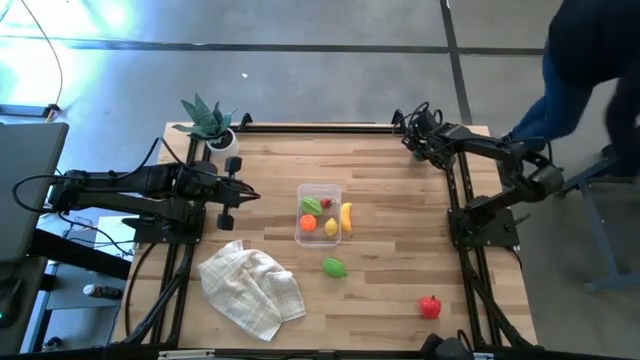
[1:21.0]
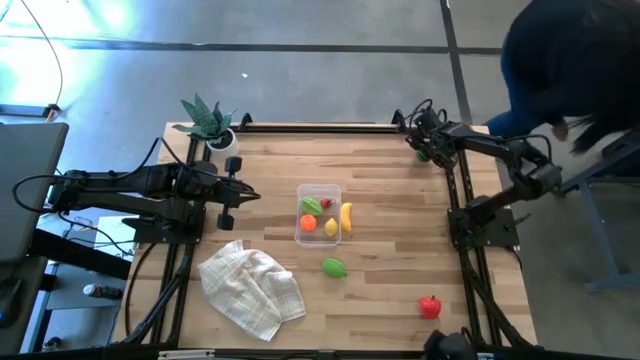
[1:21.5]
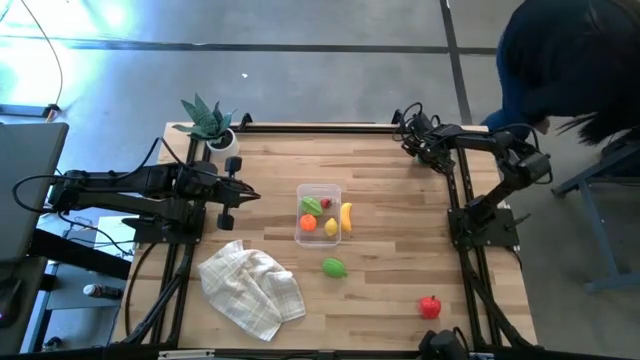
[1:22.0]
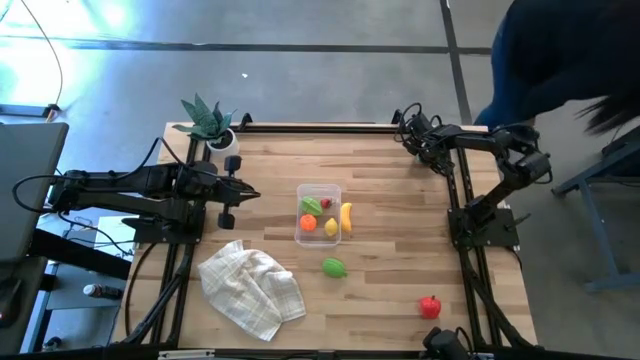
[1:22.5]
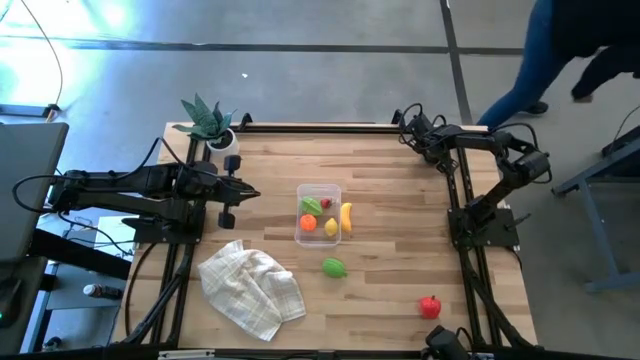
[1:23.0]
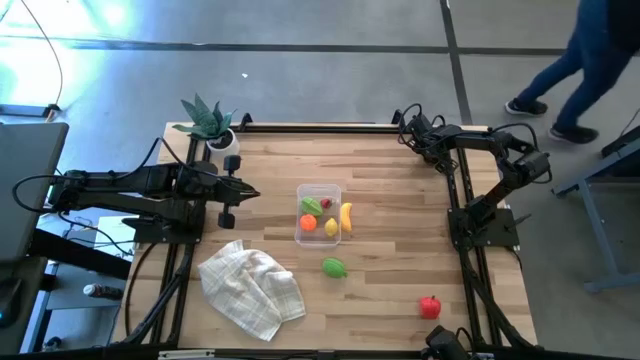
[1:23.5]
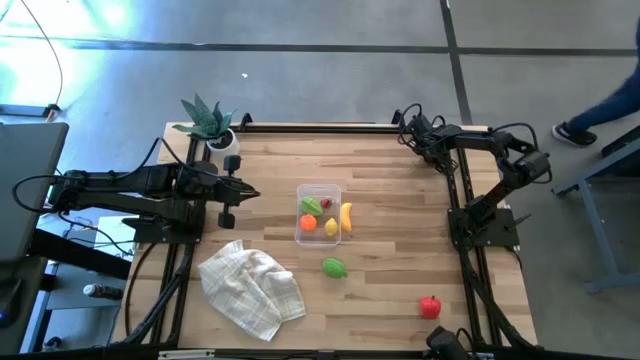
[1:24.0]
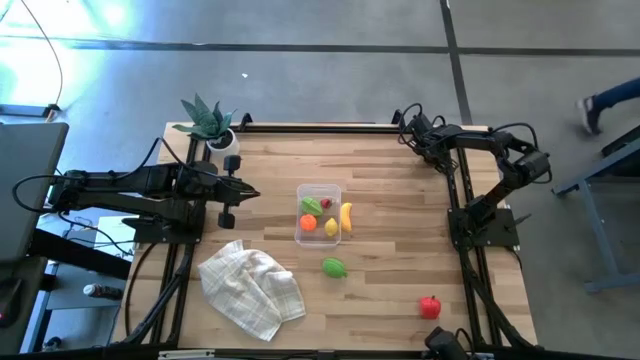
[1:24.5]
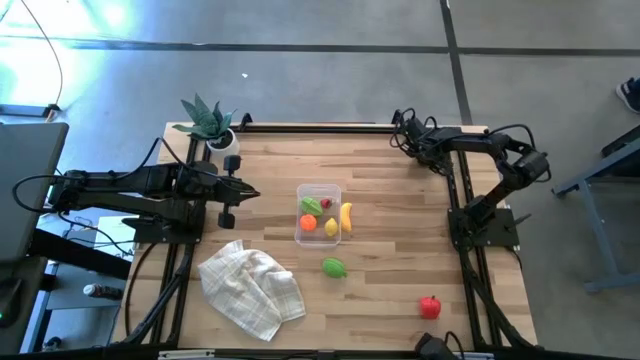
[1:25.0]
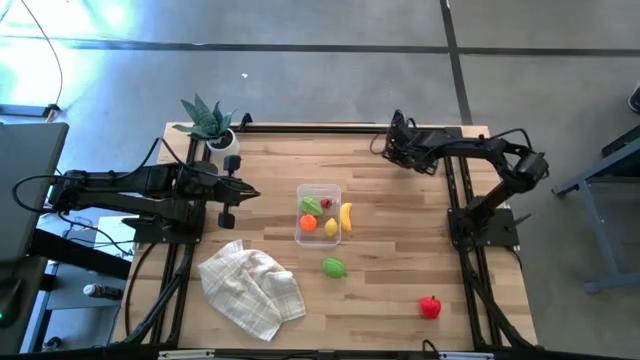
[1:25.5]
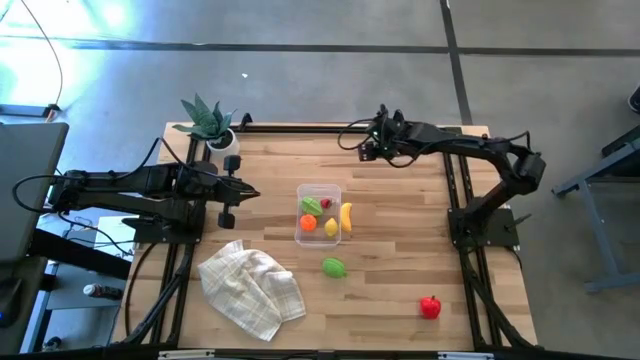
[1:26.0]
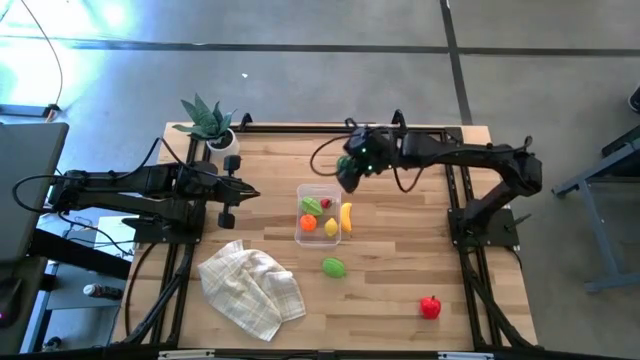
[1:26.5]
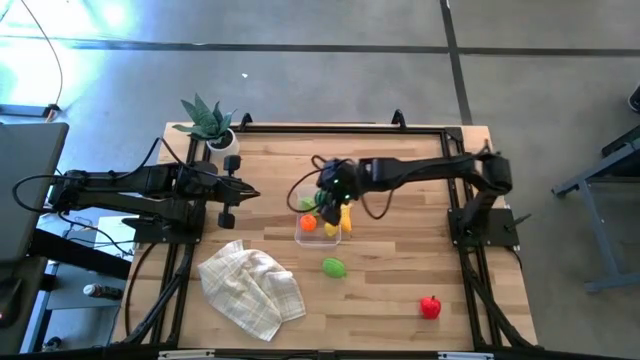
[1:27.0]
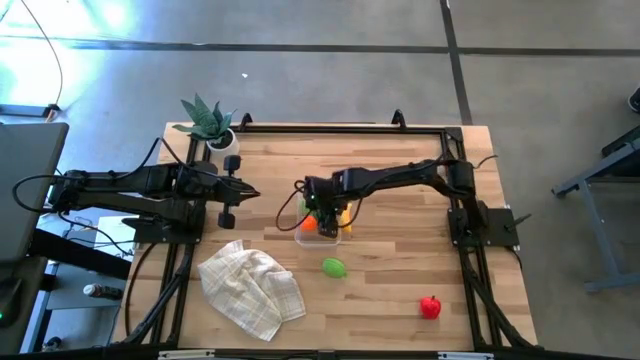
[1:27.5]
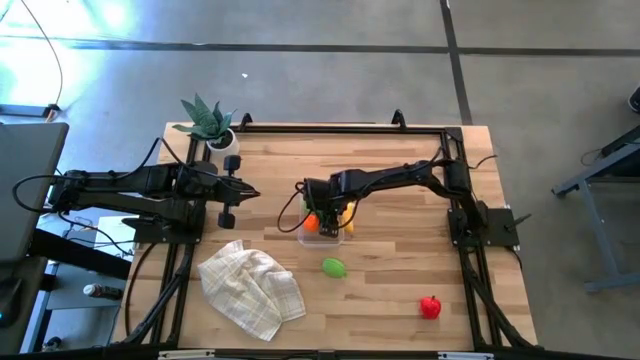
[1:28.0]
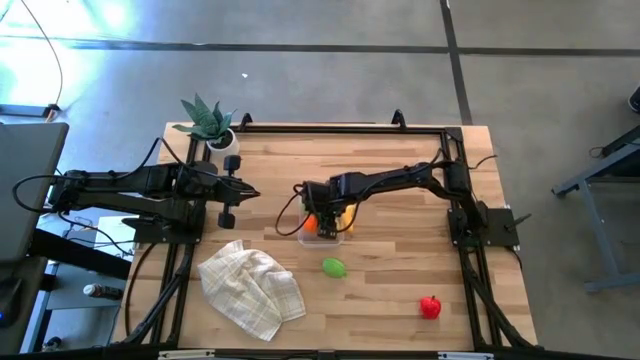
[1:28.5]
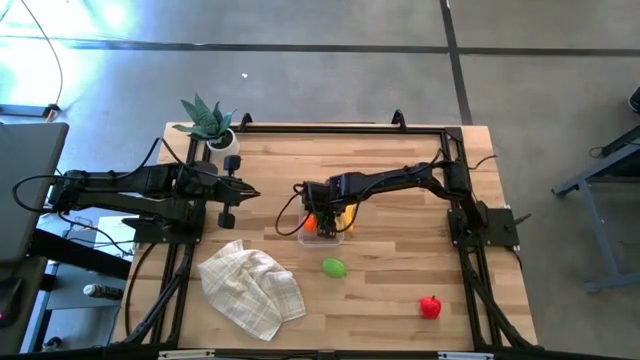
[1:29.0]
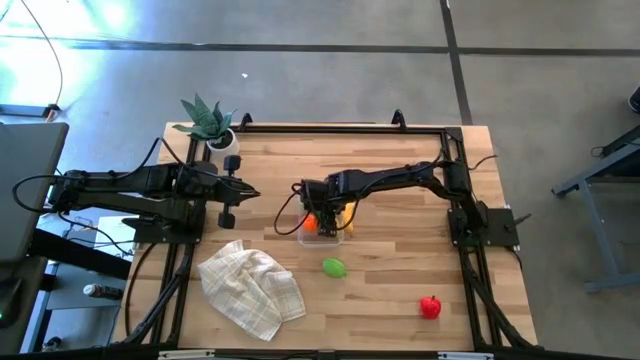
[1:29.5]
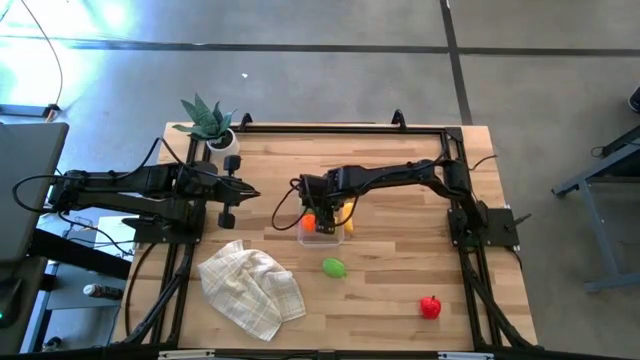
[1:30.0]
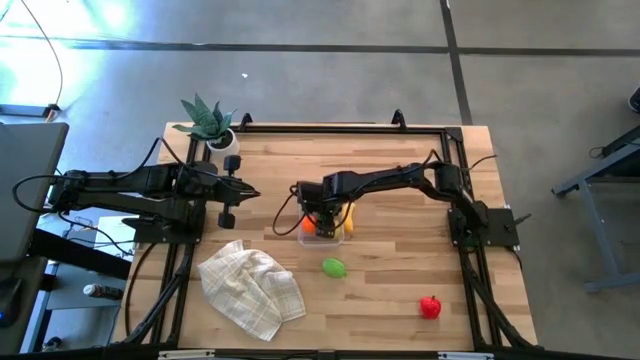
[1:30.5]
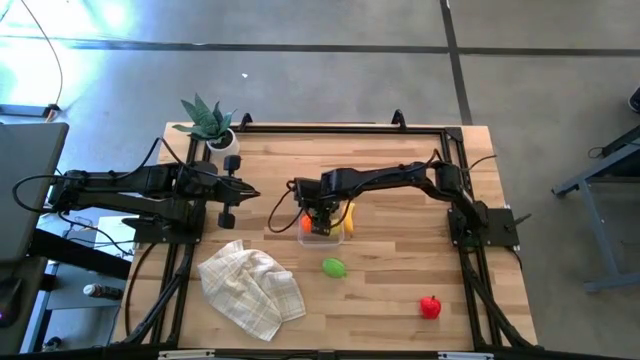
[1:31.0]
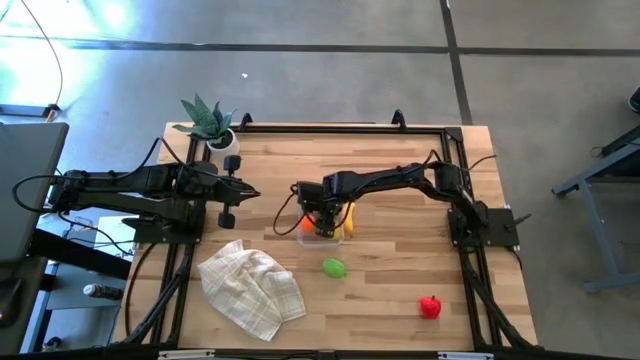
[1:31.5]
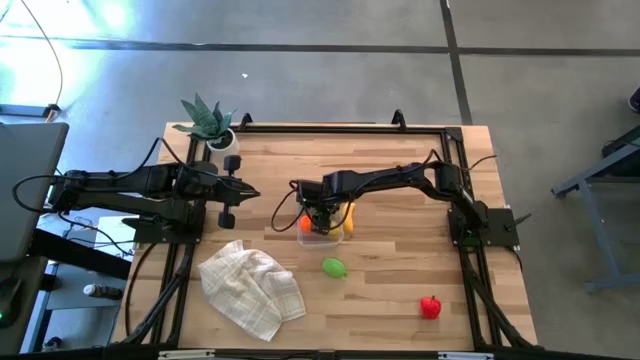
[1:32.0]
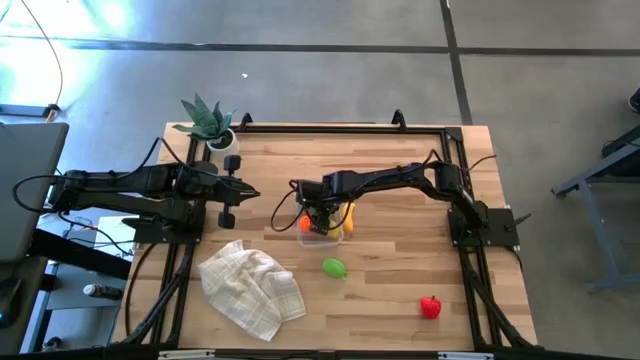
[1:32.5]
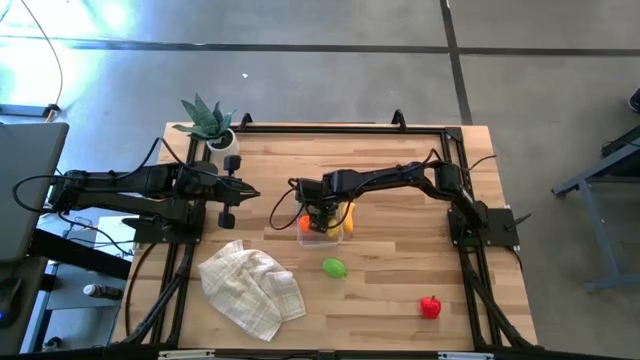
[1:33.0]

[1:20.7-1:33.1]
Task: Pick and placing Produce into tupperware
Put the green watermelon into the transparent bin

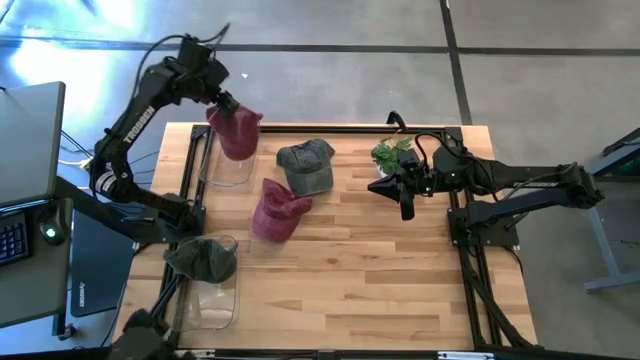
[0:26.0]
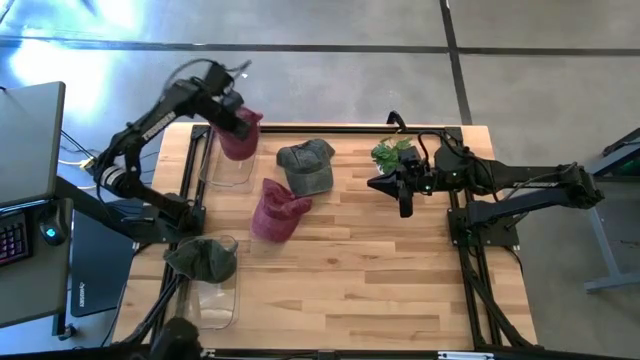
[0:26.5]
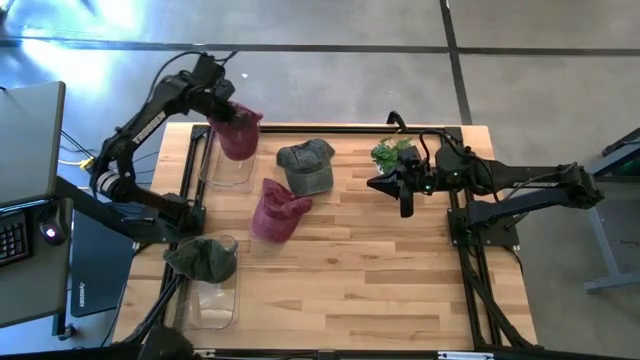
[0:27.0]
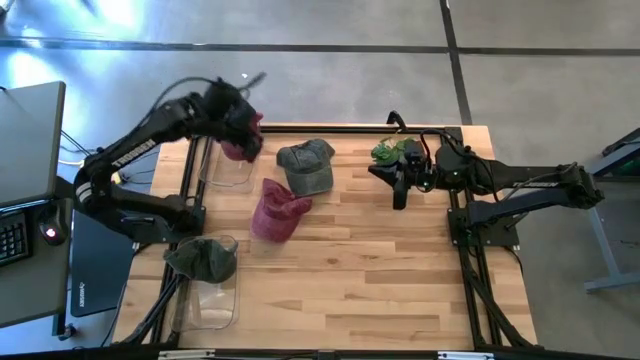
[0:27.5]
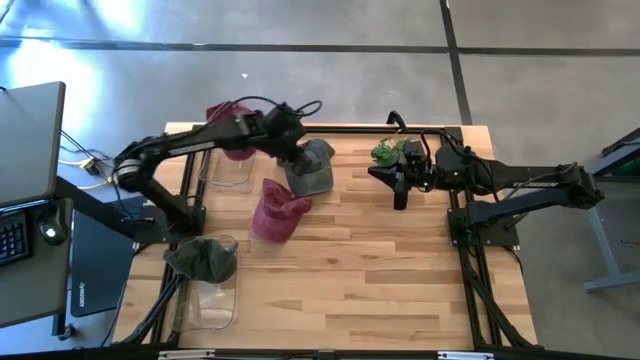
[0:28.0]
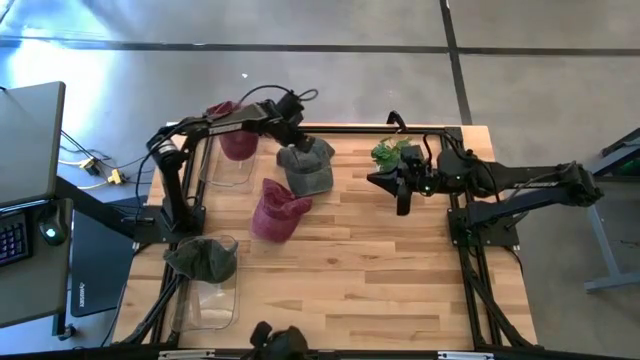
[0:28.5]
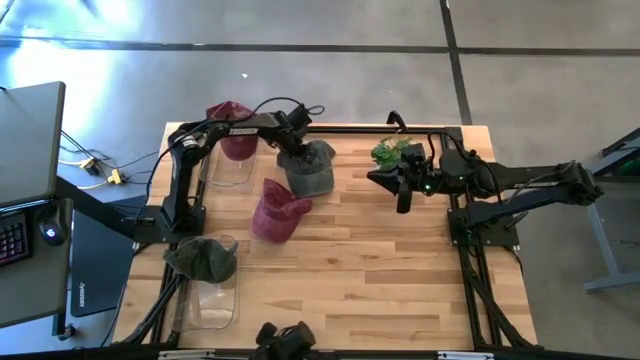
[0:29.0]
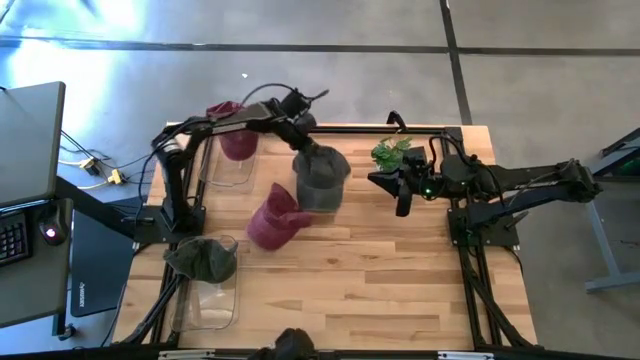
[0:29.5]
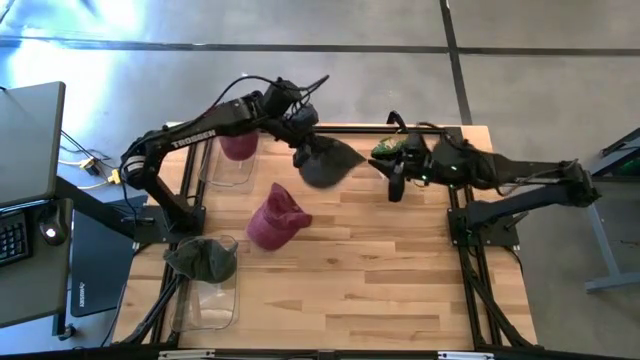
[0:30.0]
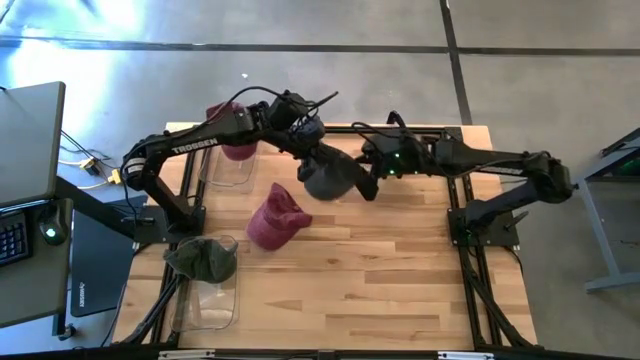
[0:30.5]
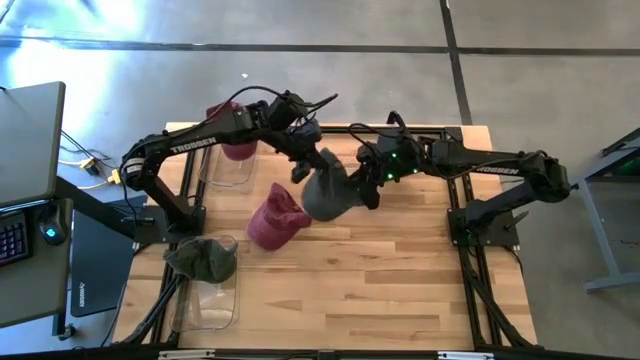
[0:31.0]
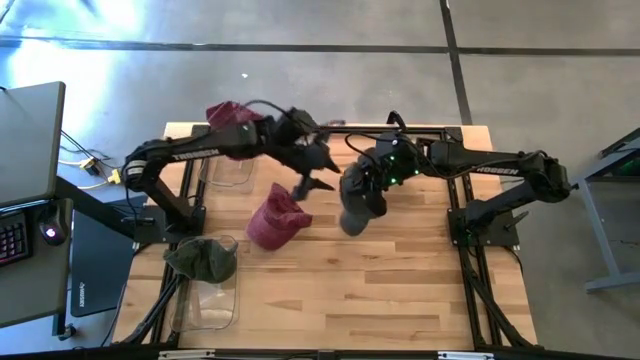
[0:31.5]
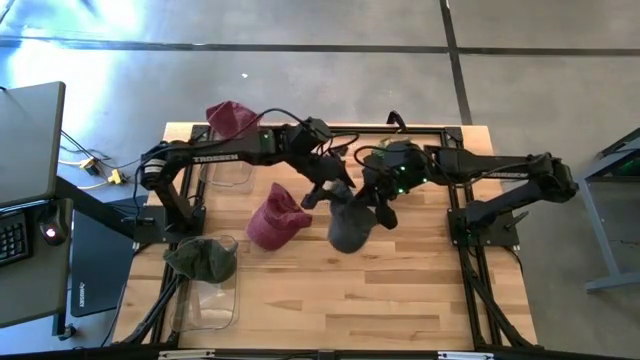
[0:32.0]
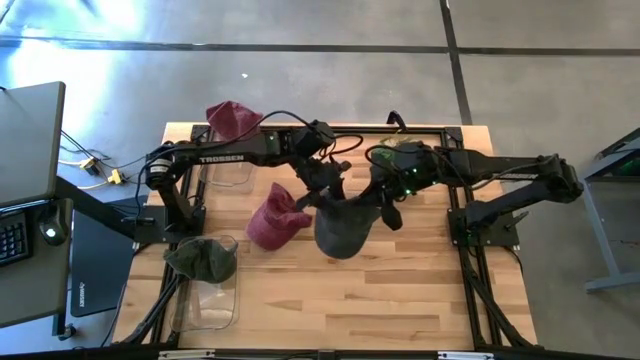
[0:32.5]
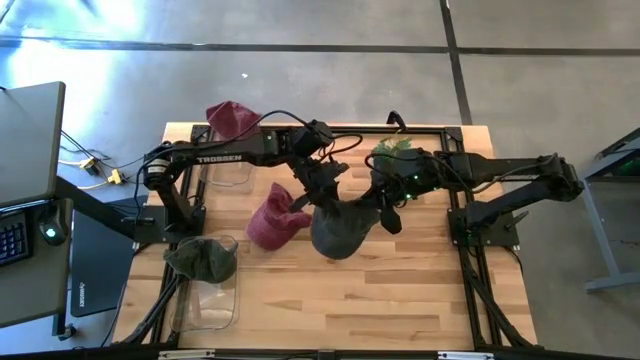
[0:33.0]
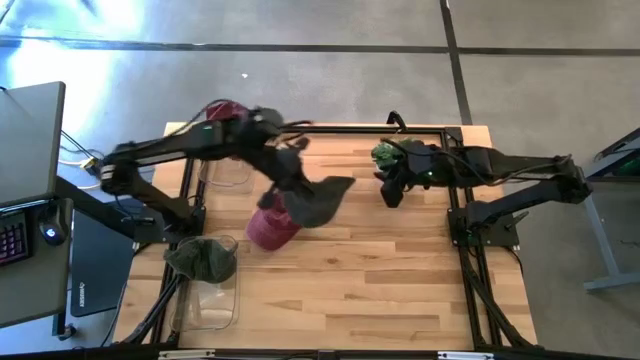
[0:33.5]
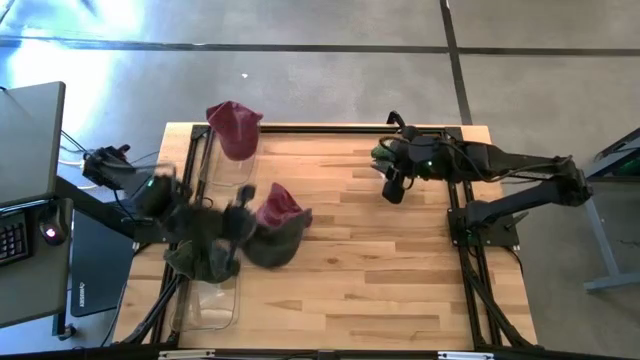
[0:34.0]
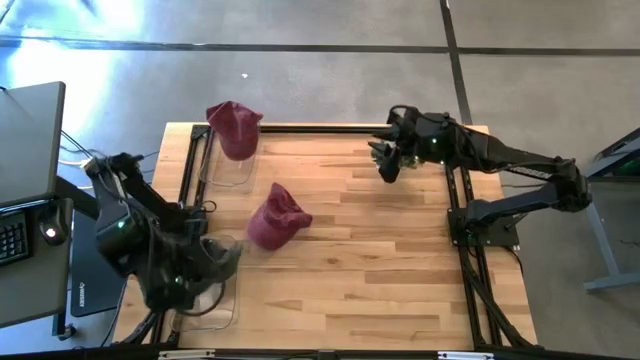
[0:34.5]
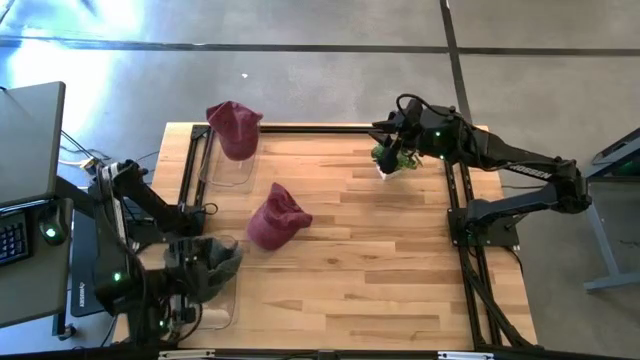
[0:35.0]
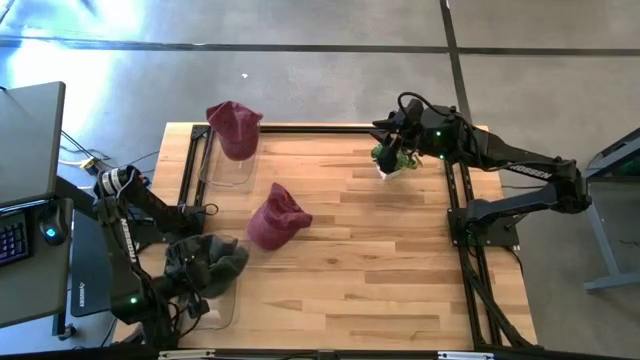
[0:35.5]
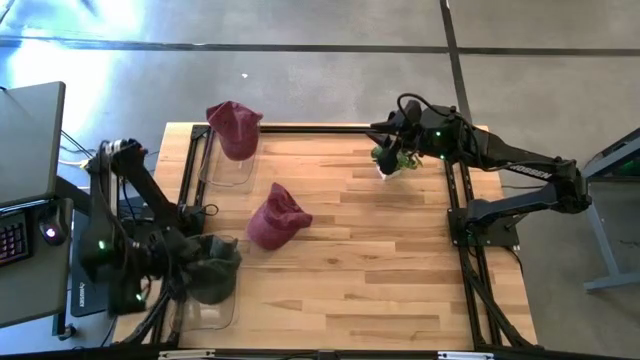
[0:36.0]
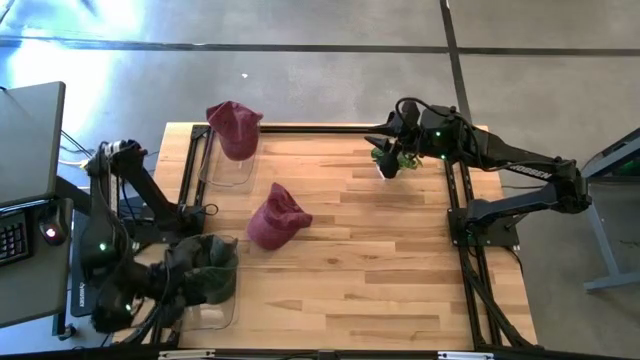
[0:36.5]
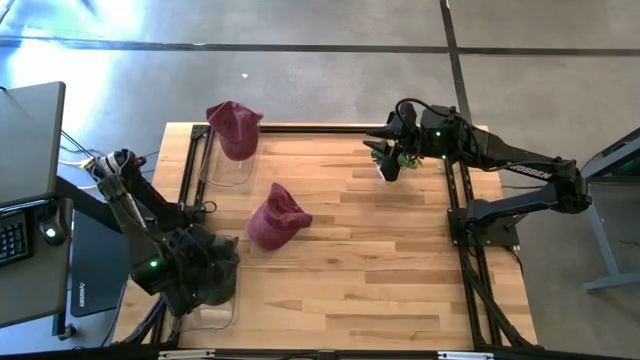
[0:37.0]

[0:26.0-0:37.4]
Task: Pick & Place hat
Put the black cap into the bottom transparent bin
